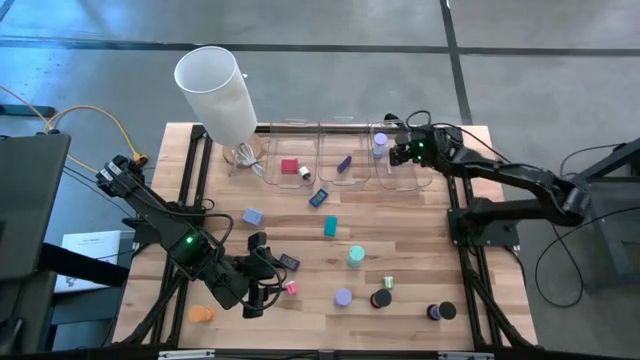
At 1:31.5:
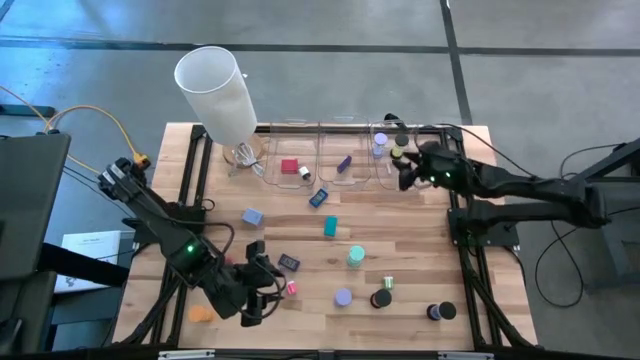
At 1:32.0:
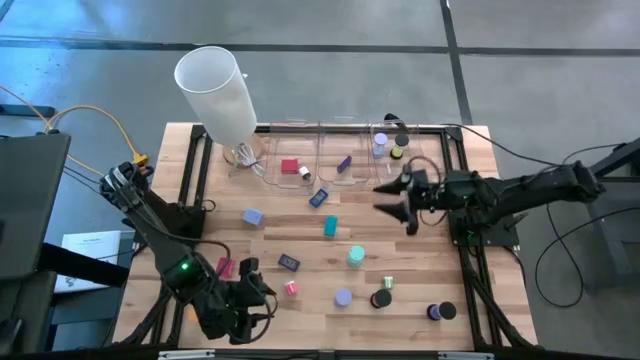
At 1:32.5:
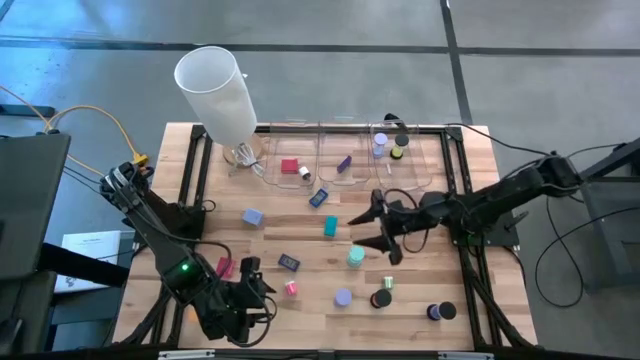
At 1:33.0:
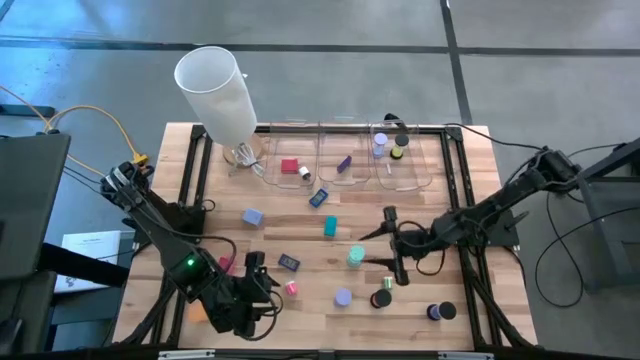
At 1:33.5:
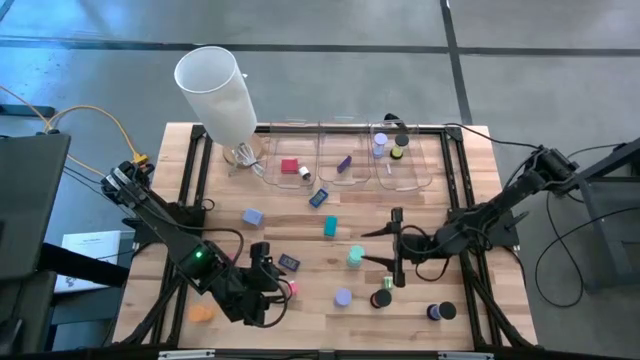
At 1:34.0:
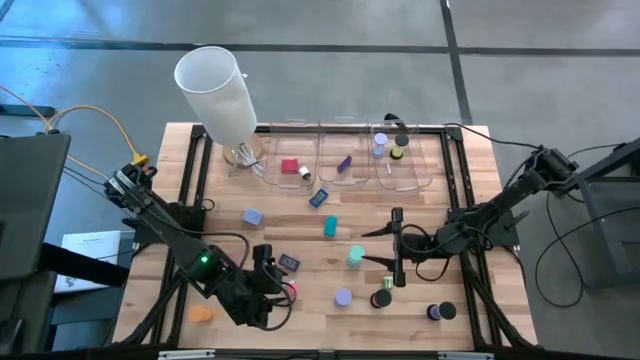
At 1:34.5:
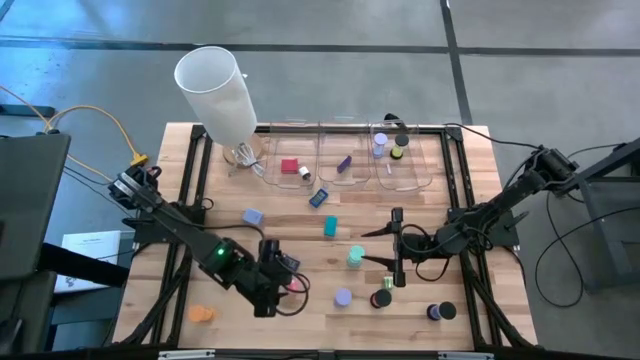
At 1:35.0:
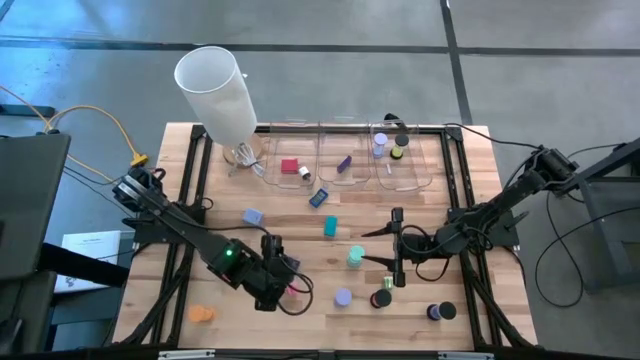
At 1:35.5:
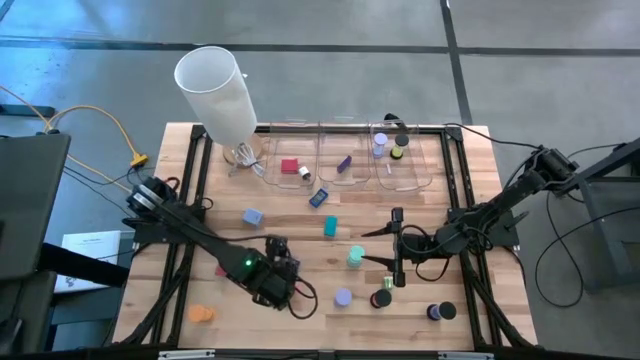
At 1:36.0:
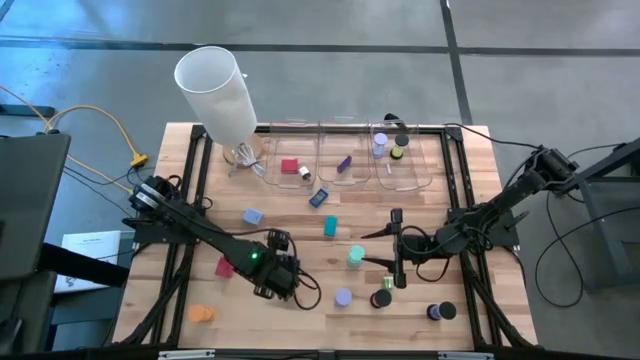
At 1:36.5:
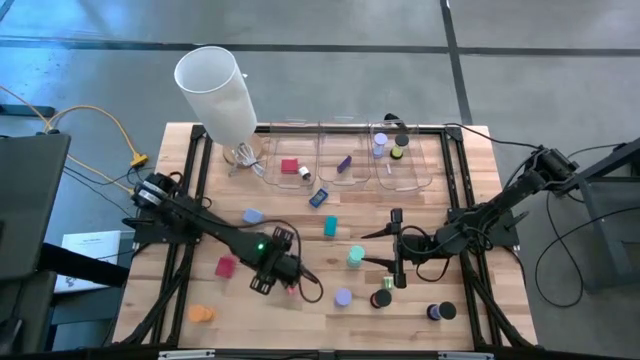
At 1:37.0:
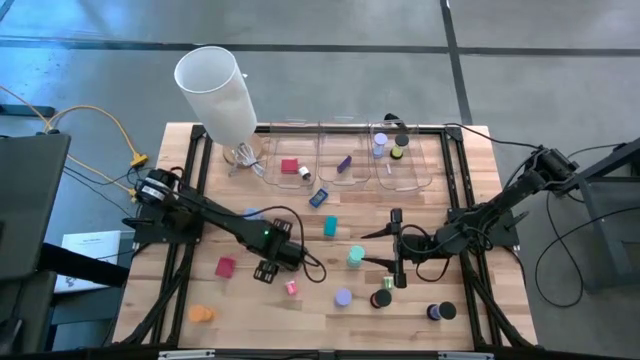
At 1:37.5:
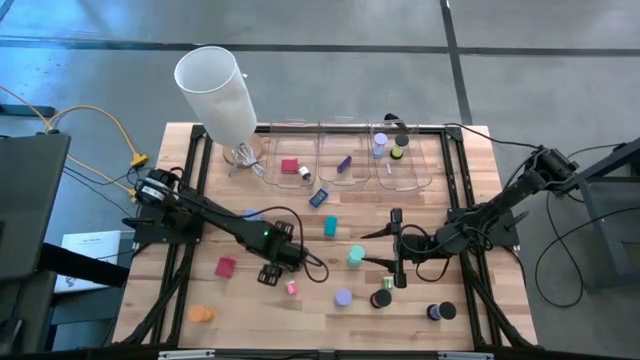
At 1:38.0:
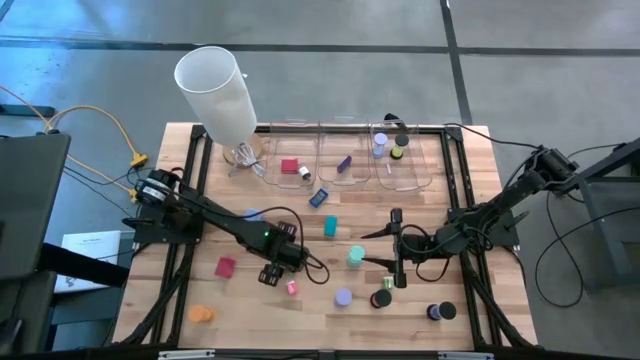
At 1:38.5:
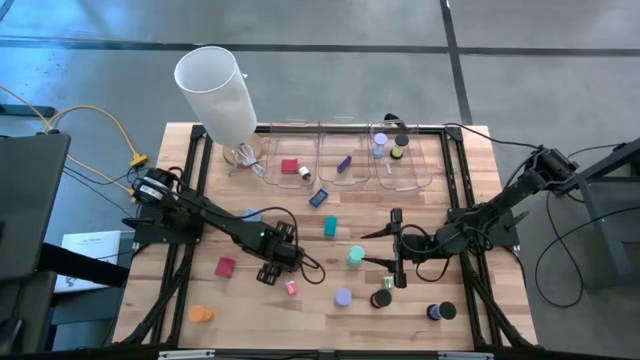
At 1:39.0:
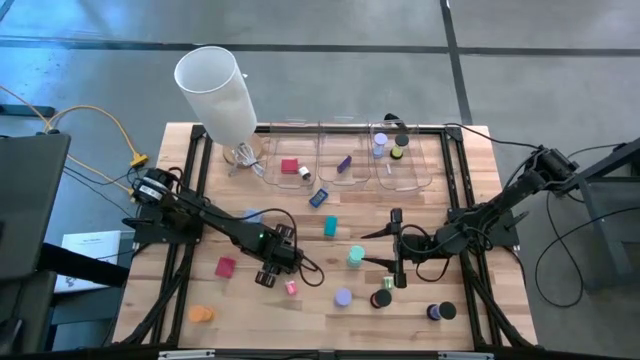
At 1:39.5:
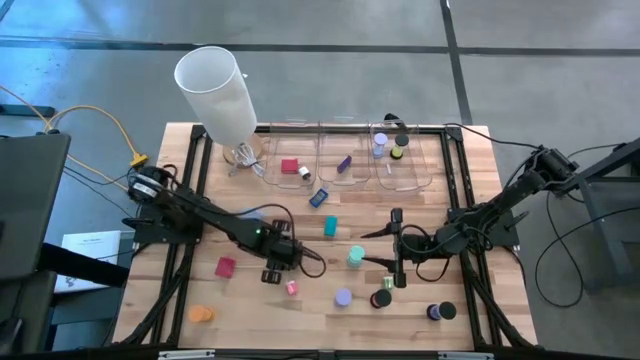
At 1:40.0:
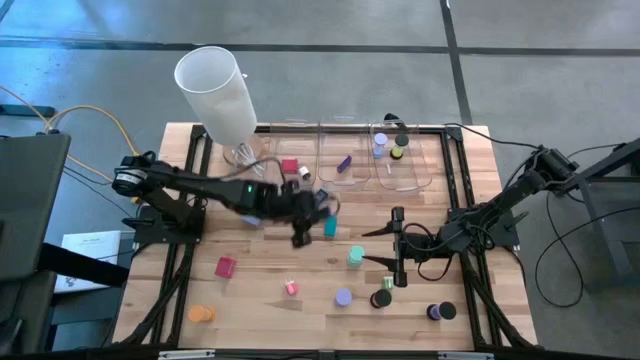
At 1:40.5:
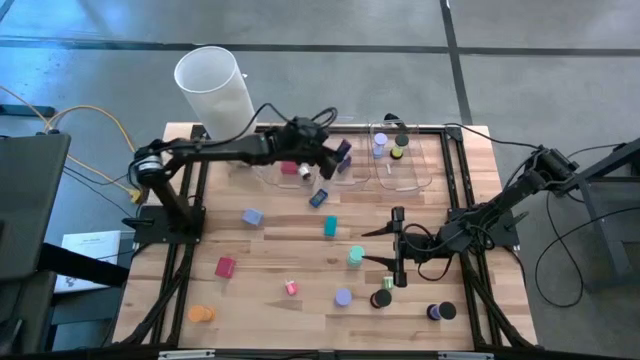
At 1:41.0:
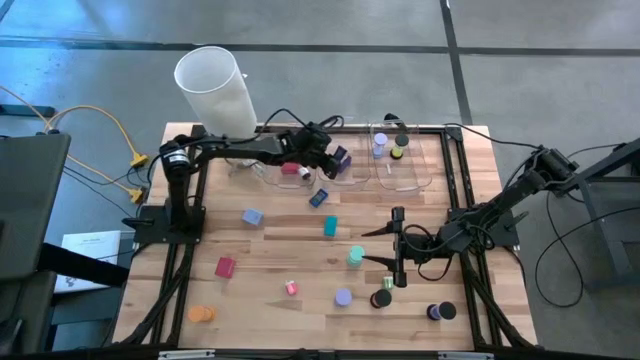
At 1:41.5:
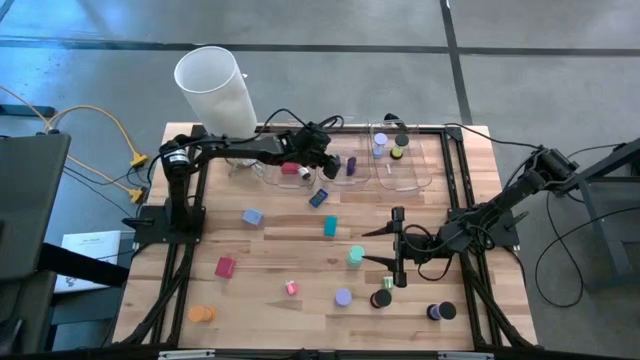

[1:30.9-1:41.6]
Task: Pick & Place Office items
Put the purple digital clock into the middle transparent bin

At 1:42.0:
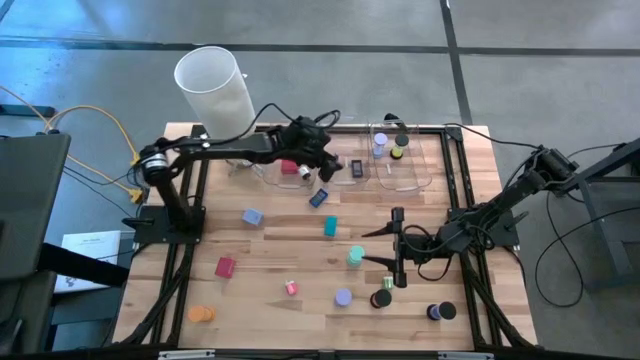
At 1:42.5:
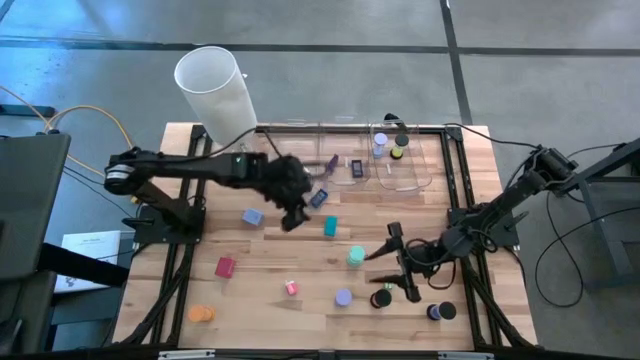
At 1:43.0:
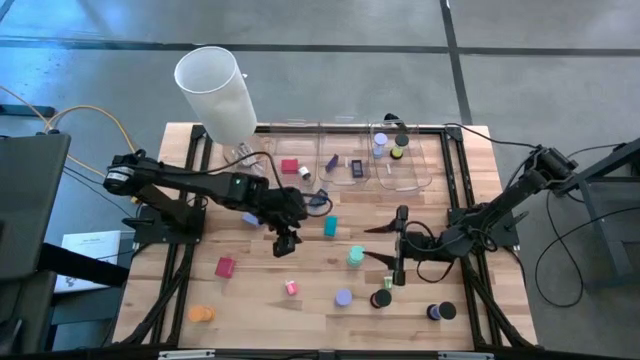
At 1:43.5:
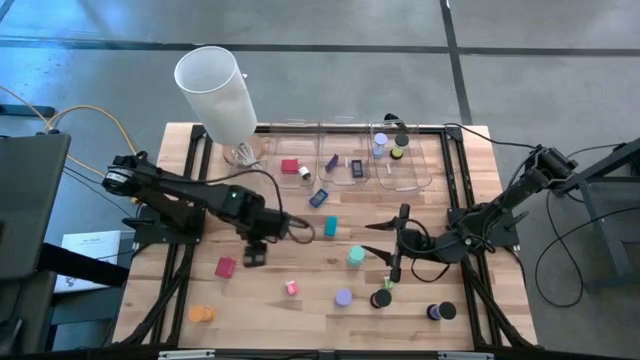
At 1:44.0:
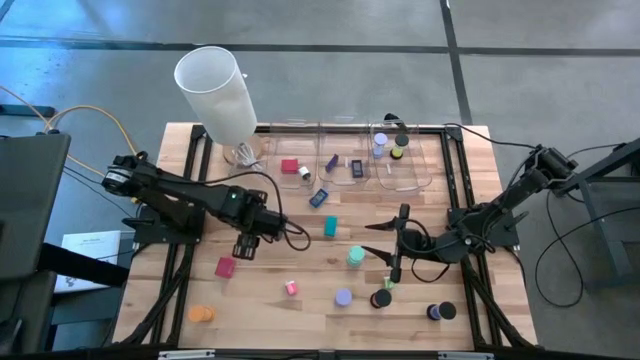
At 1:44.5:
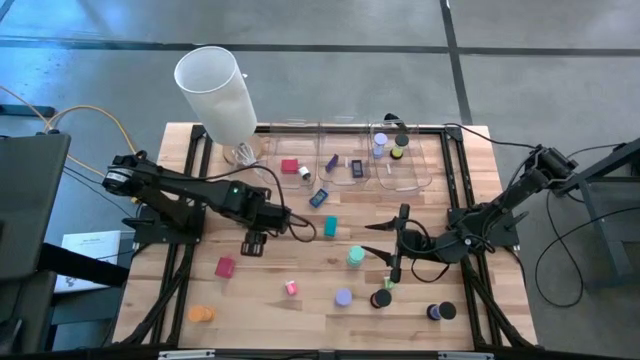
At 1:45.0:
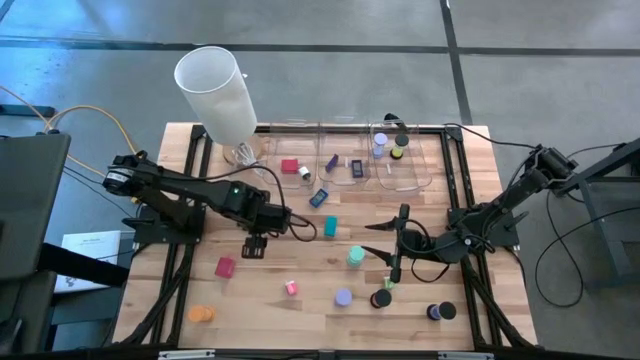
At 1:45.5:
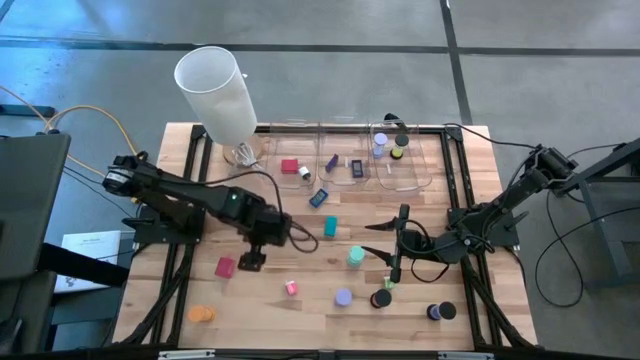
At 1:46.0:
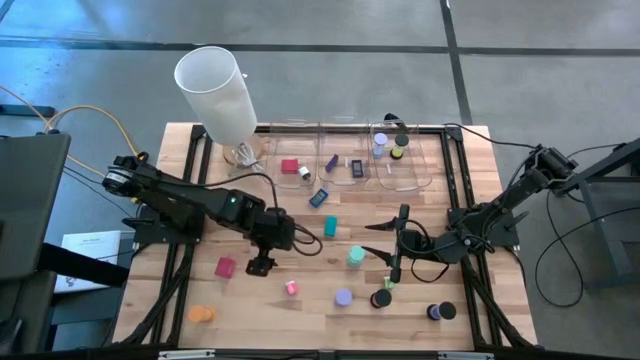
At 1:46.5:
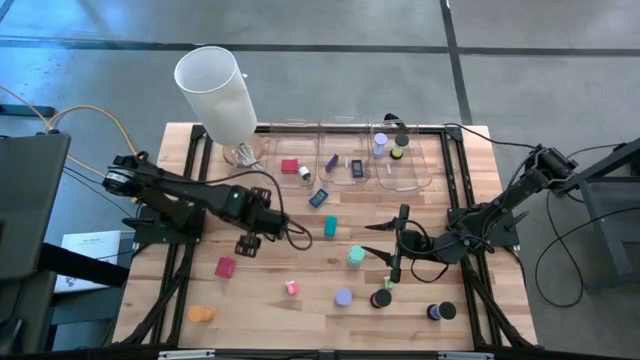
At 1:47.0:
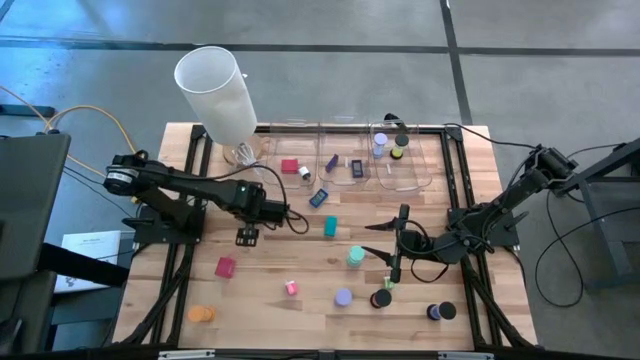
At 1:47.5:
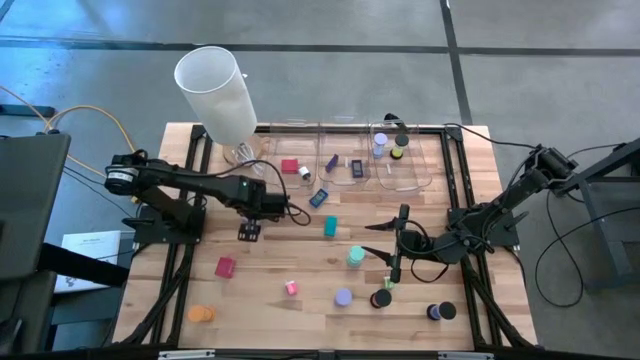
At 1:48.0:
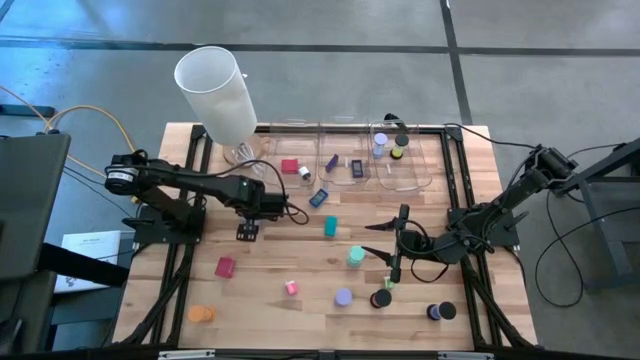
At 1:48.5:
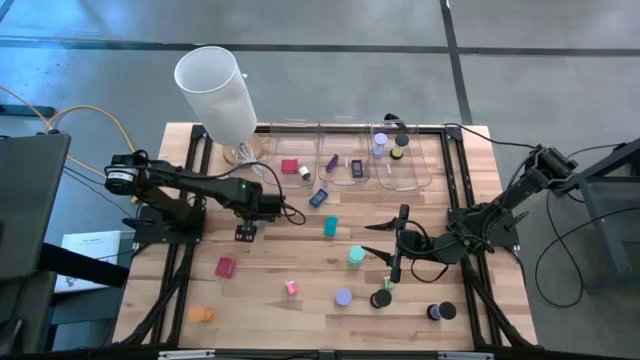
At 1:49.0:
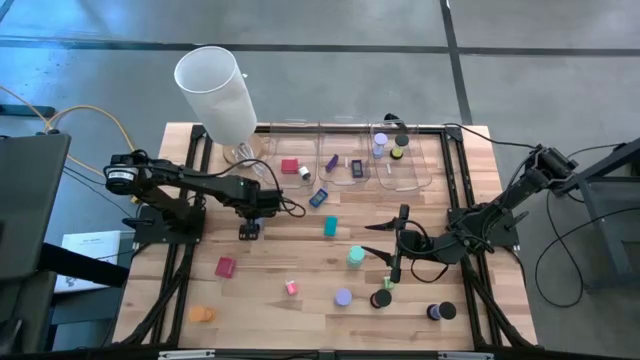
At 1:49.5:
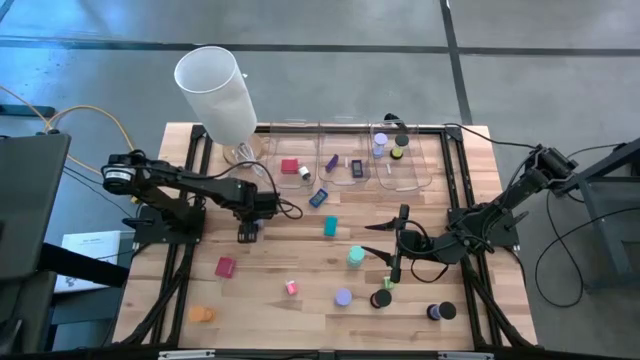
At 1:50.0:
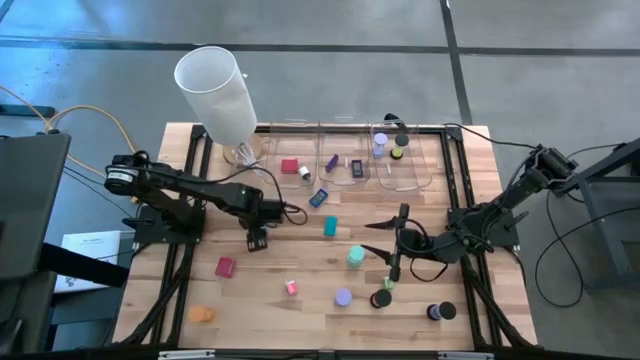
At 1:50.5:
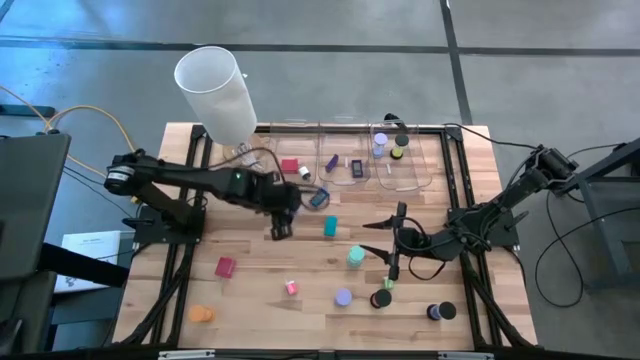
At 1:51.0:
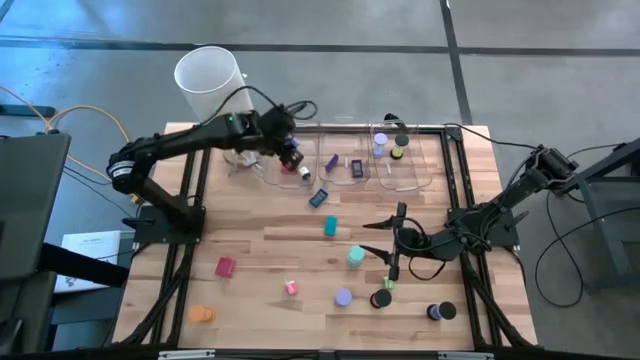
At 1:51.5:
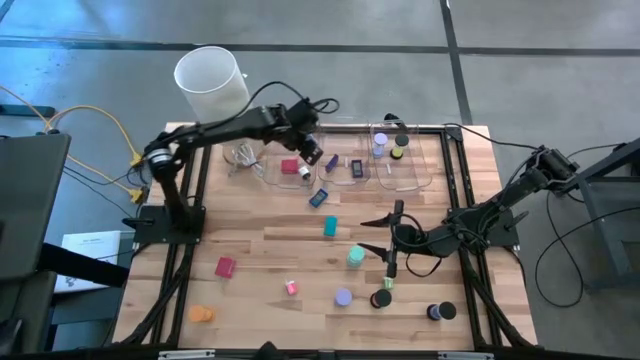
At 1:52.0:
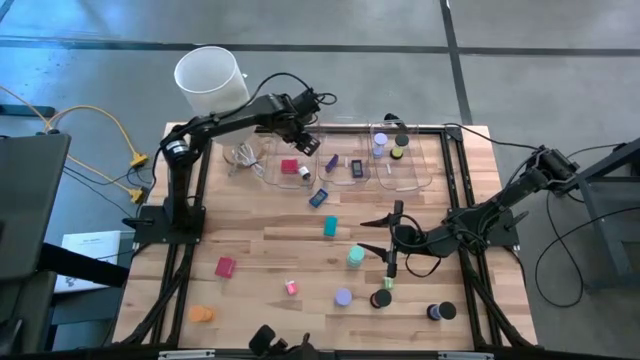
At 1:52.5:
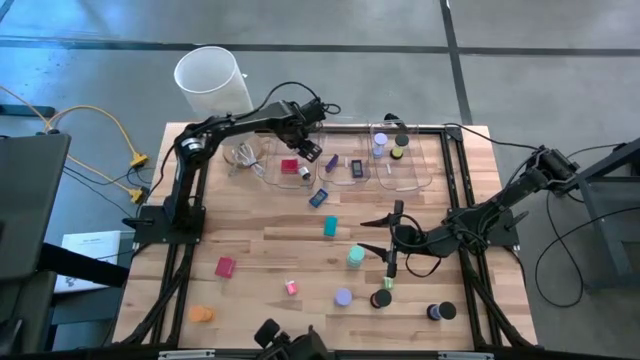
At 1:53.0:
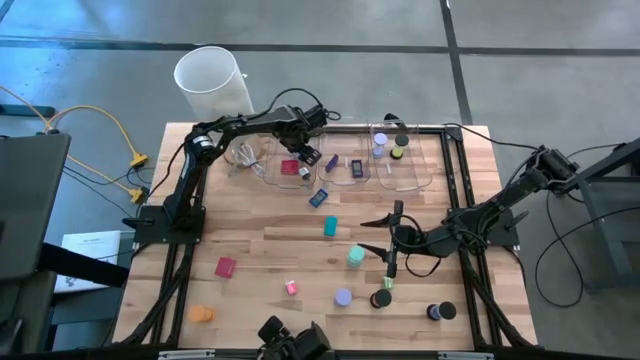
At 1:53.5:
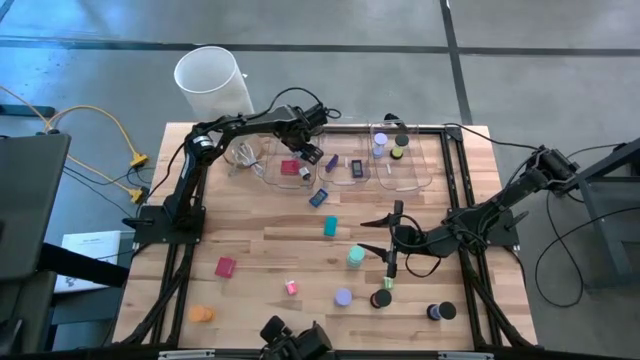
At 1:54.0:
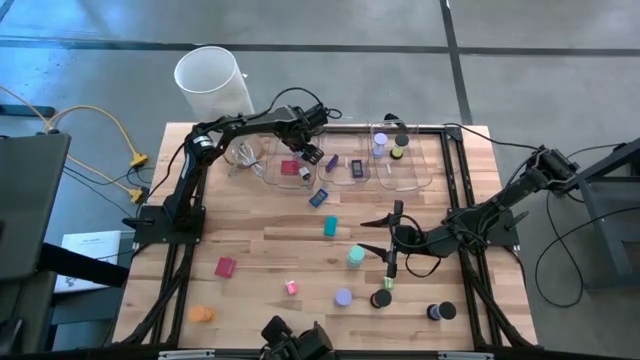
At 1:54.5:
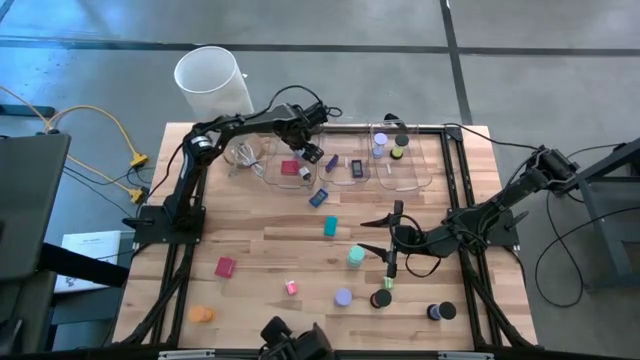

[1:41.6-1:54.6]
Put the violet charger adapter into the left transparent bin
